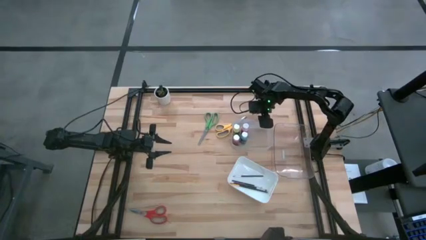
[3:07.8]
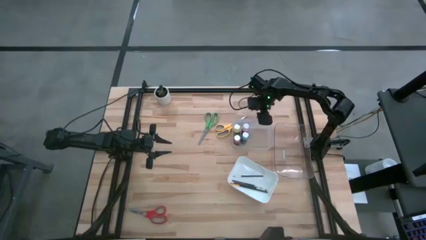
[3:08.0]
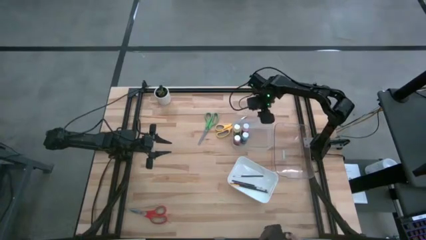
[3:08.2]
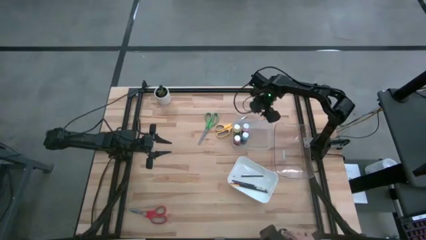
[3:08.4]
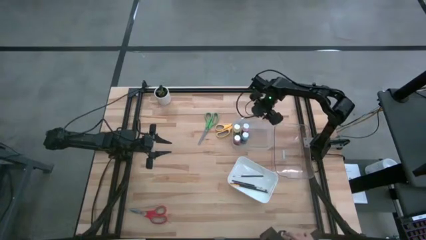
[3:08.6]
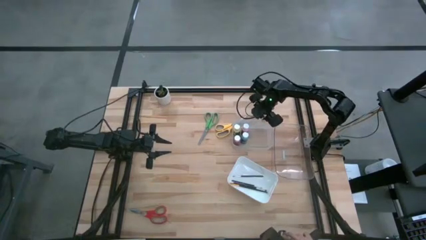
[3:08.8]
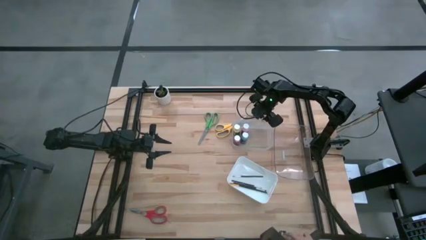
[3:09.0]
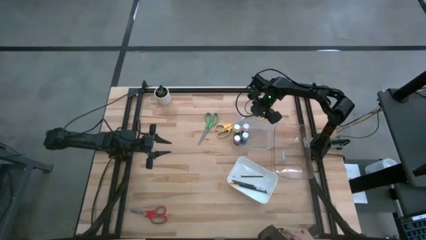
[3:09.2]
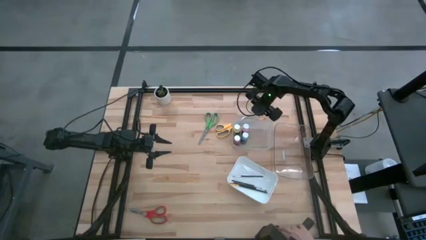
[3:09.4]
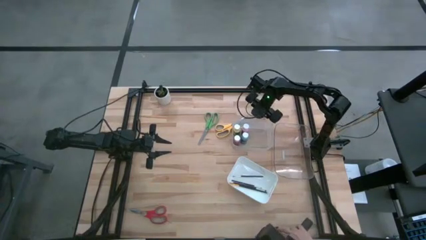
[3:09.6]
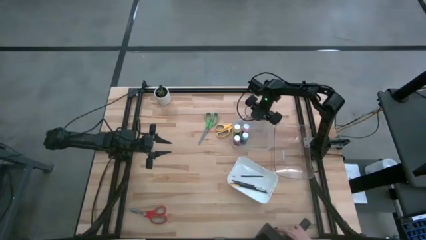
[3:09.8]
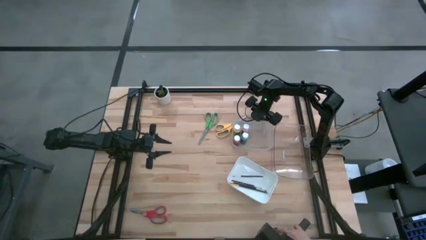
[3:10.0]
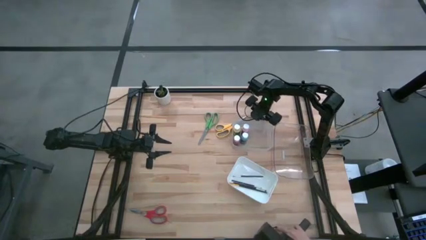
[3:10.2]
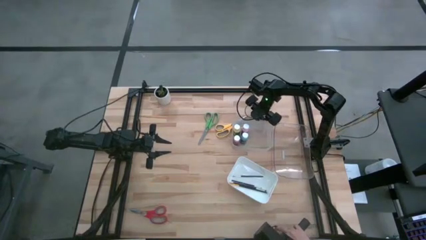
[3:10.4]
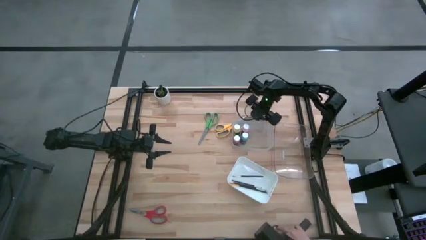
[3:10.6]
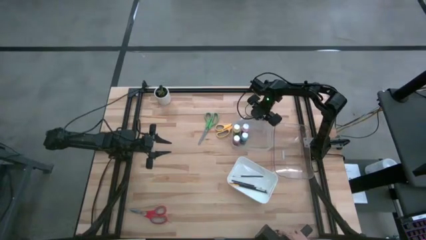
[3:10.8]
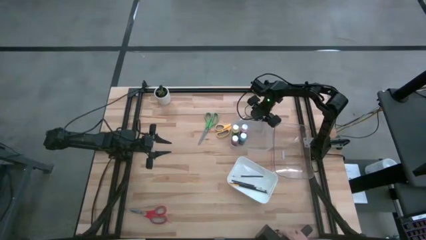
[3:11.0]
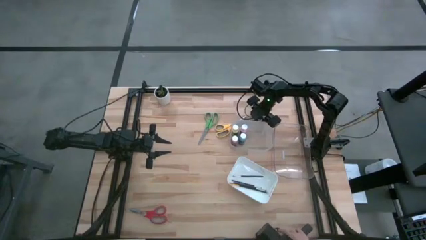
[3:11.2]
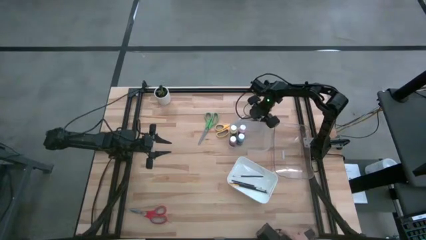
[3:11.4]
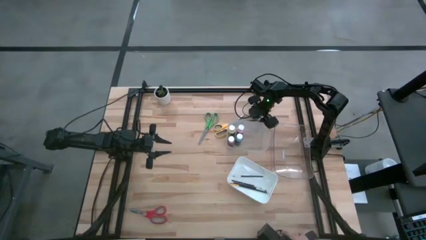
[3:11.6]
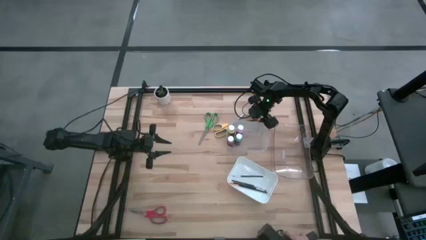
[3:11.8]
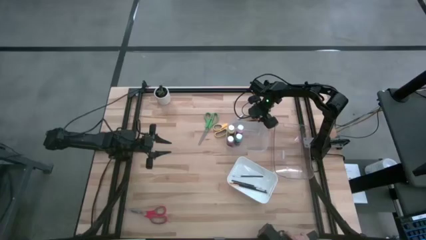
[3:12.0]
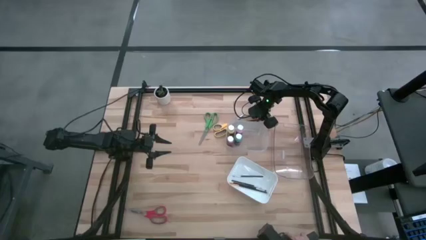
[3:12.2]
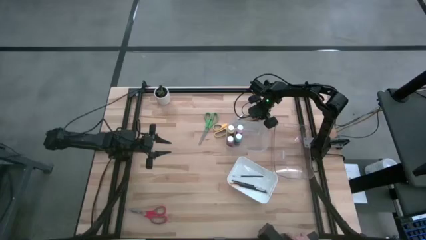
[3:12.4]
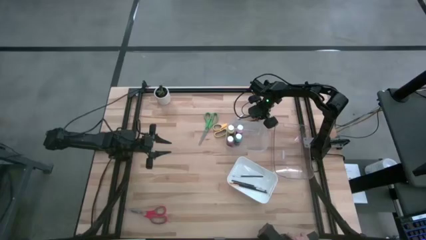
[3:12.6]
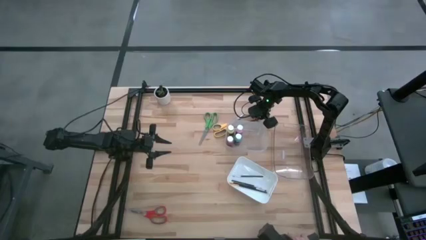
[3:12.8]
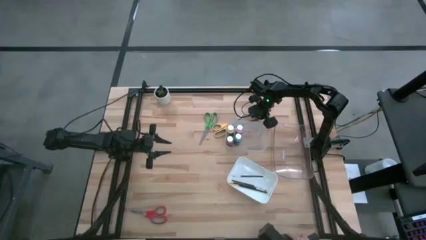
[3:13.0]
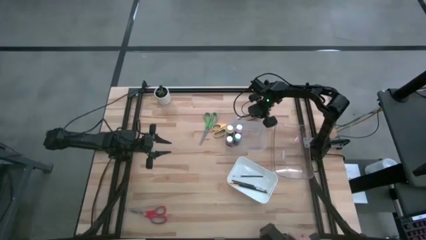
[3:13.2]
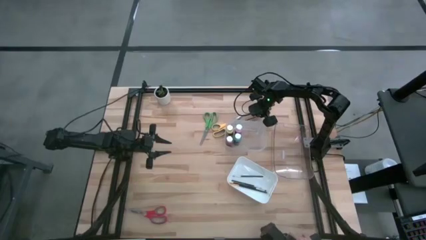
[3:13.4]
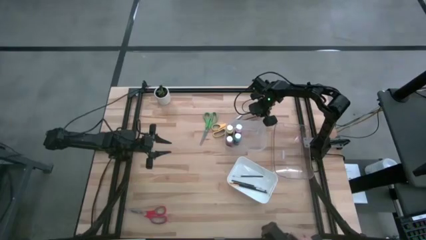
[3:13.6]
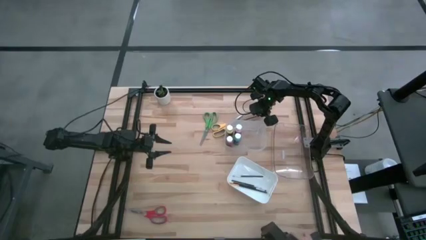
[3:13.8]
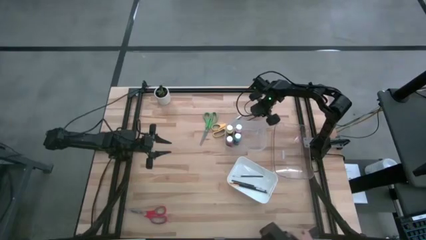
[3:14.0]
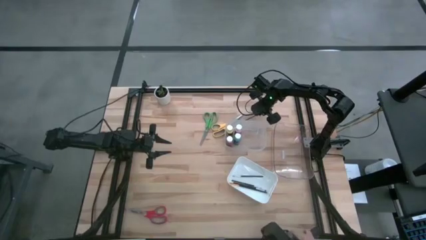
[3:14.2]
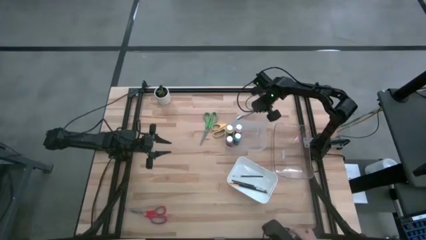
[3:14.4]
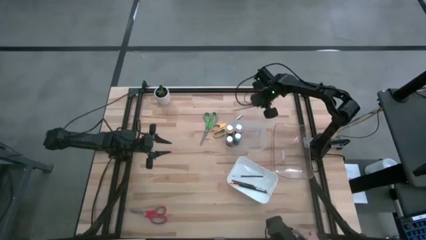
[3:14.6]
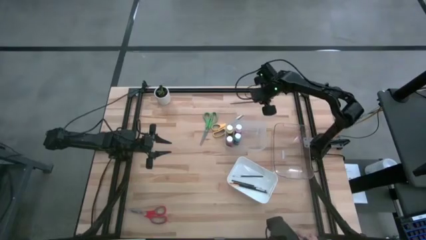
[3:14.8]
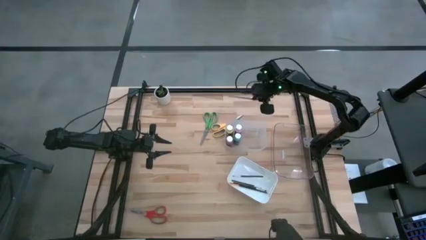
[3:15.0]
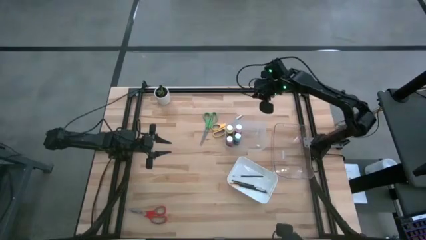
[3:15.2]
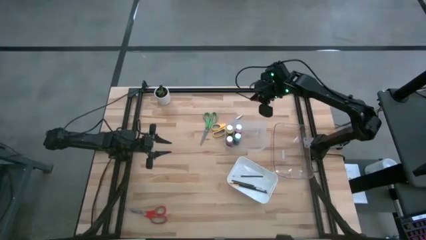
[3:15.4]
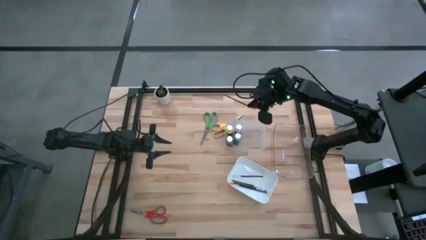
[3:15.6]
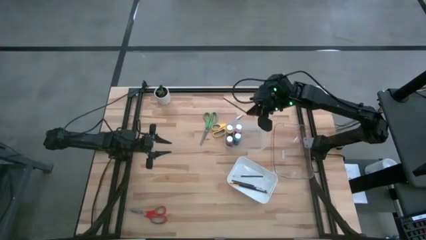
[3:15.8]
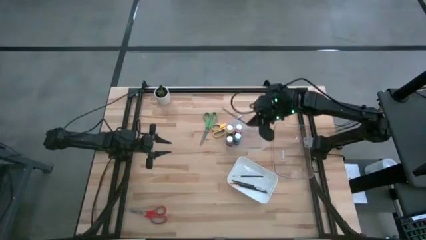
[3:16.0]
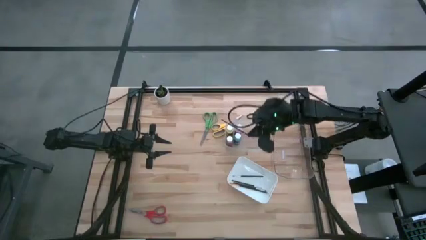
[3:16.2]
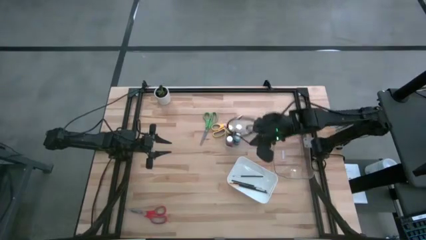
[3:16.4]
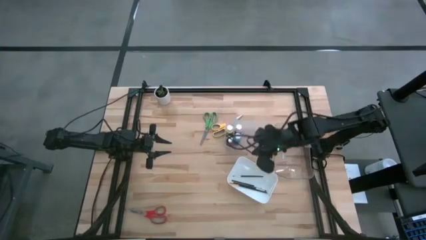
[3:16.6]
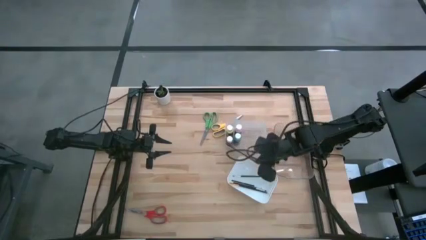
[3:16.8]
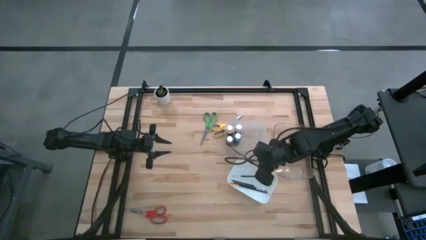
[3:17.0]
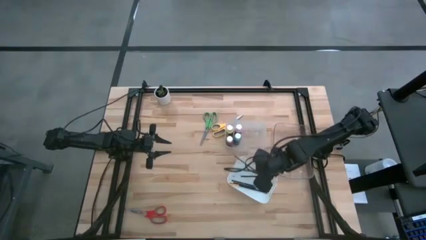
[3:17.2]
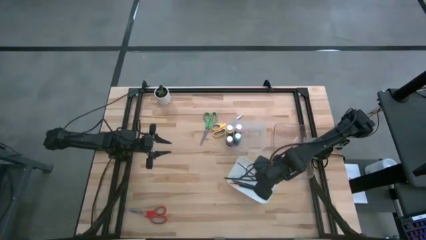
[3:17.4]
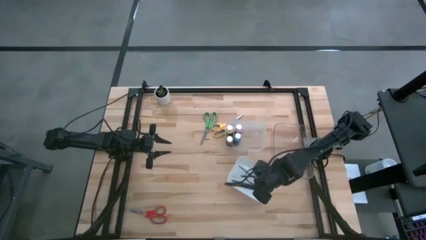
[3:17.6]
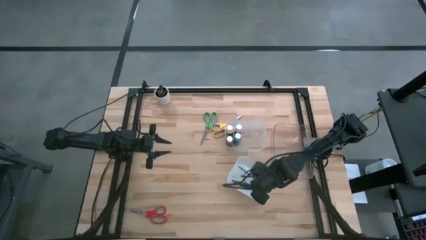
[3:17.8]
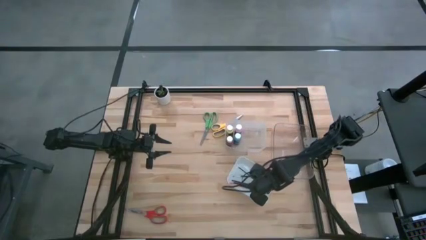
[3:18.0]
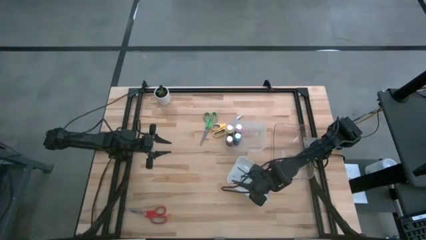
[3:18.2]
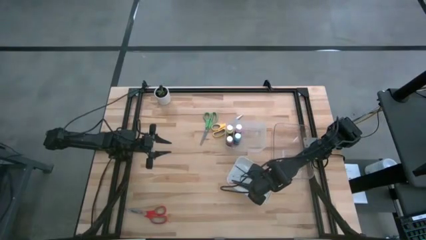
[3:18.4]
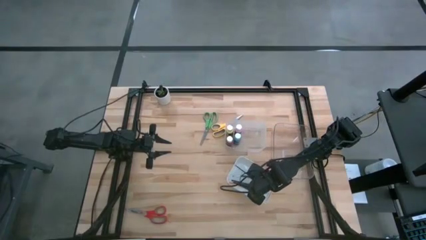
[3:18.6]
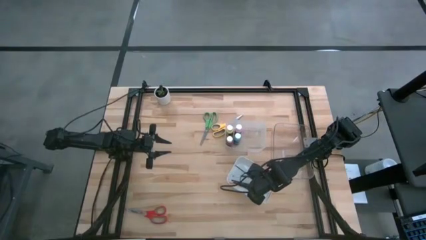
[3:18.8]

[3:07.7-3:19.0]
Task: Pick & Place Paint Supplies
Put the black paintbrush into the white bin

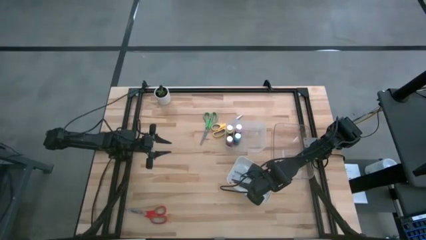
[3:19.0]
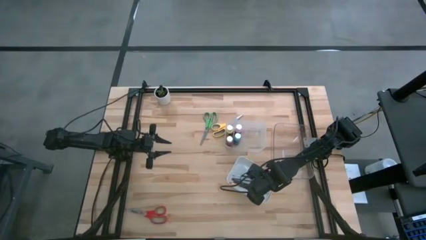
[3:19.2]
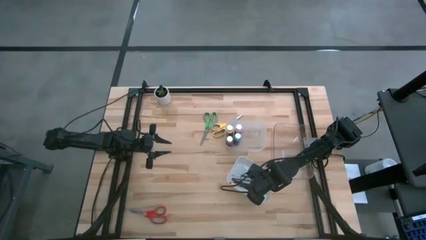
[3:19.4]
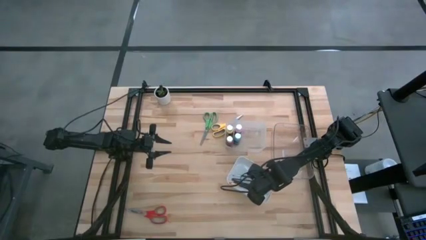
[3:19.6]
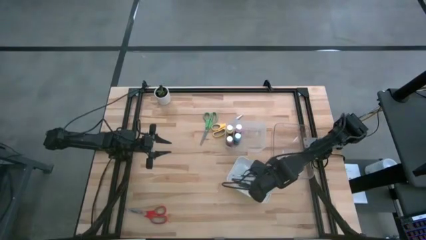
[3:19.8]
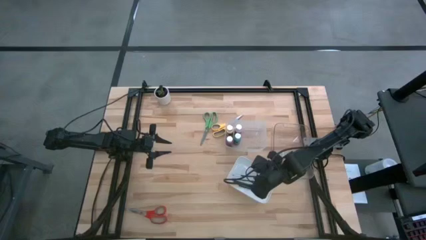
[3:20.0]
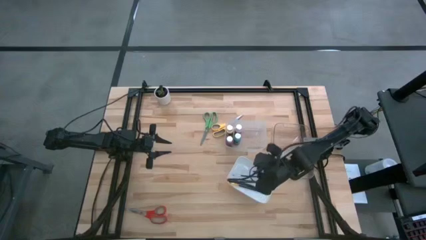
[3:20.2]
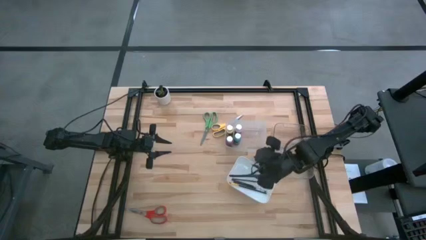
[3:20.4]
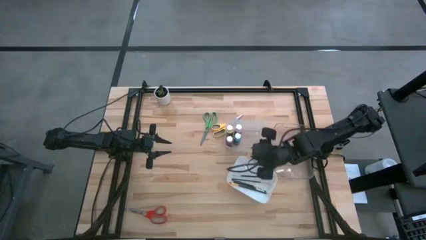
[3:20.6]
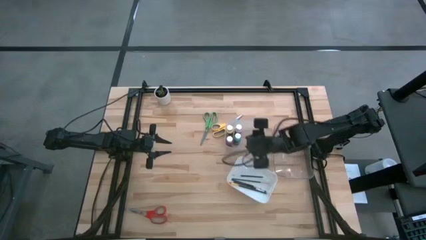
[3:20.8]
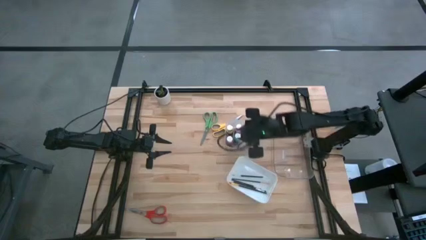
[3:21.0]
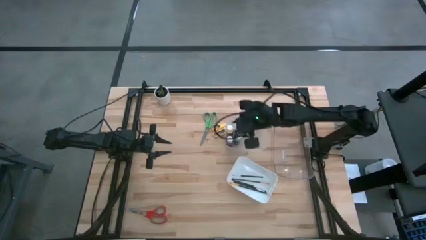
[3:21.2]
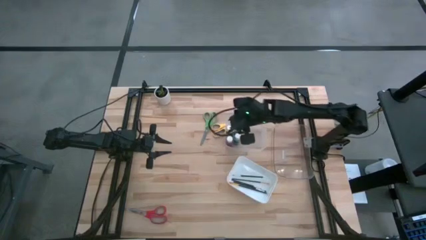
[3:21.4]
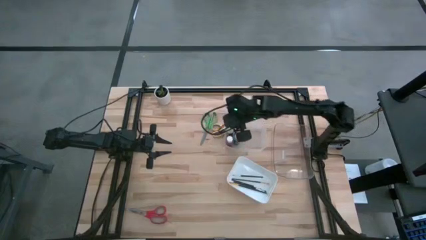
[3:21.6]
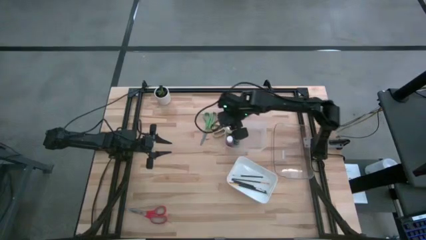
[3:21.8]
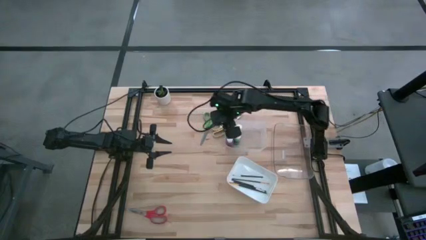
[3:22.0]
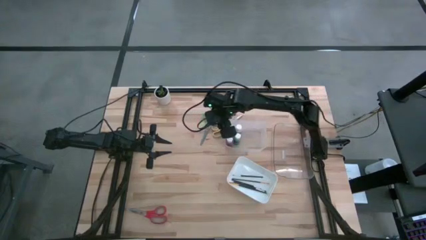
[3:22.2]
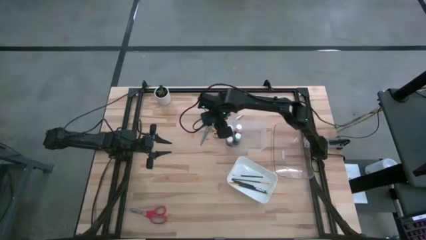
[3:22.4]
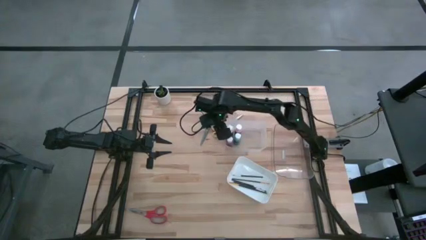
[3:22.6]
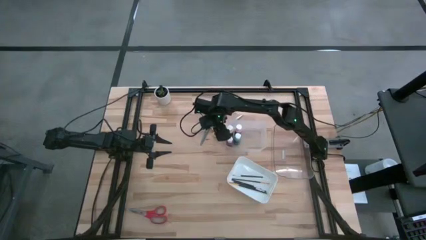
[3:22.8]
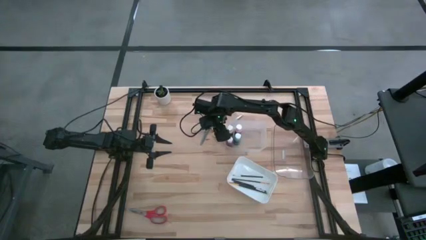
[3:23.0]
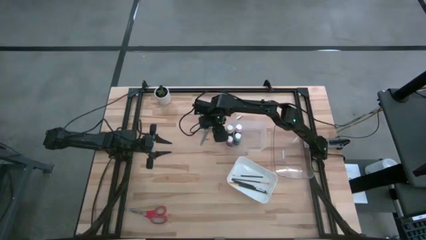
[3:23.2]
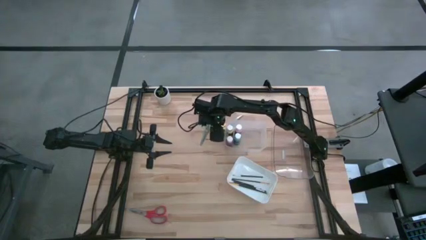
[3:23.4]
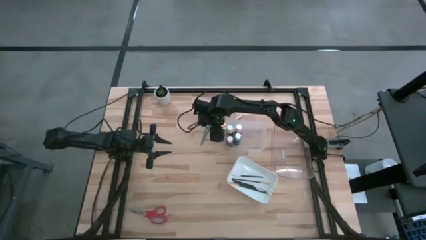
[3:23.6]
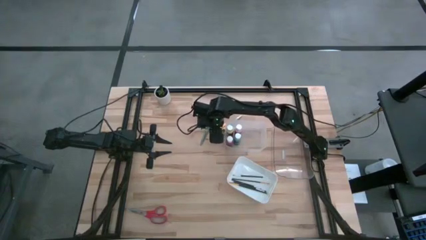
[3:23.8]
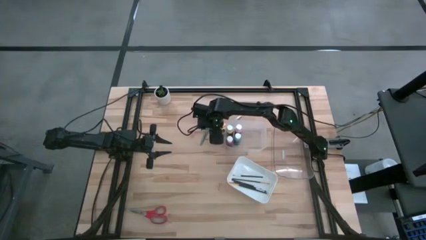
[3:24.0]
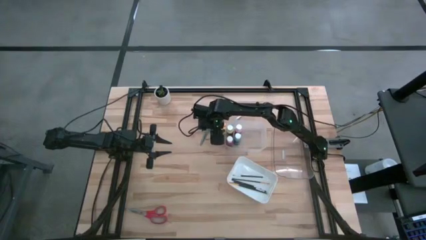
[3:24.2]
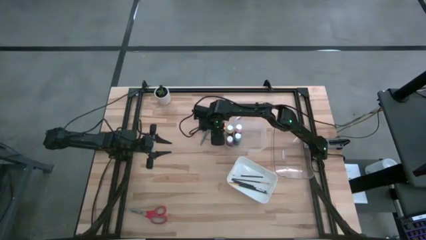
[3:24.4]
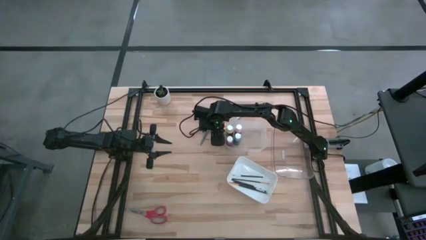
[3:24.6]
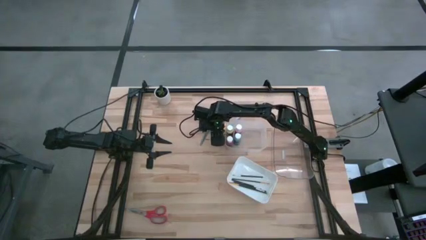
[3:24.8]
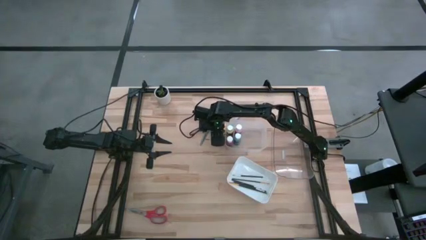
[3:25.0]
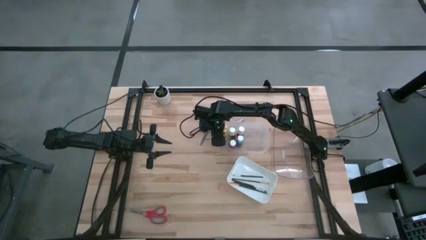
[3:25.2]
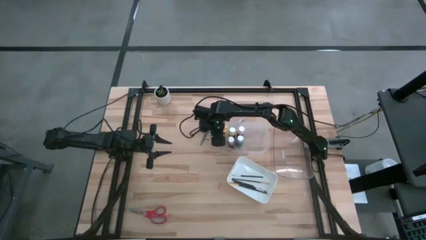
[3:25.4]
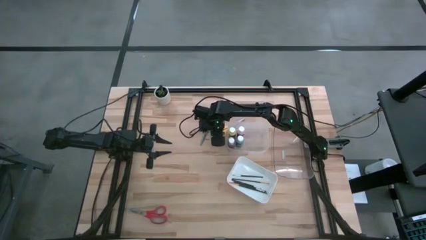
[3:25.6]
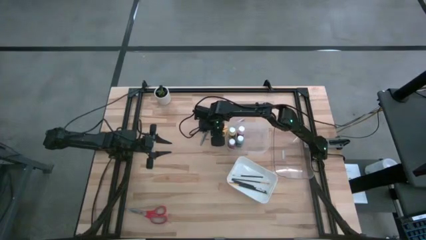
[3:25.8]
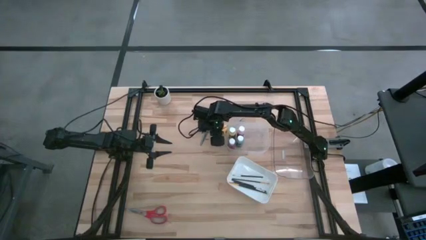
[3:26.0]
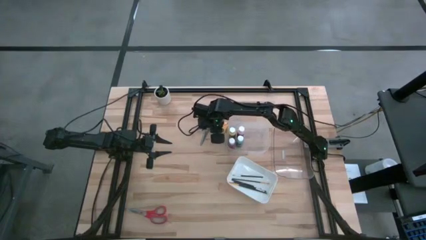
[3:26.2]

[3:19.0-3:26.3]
Put the yellow scissors into the right transparent bin
